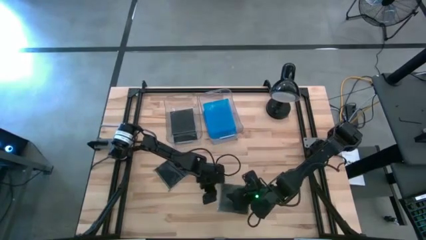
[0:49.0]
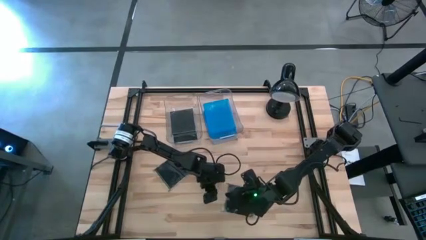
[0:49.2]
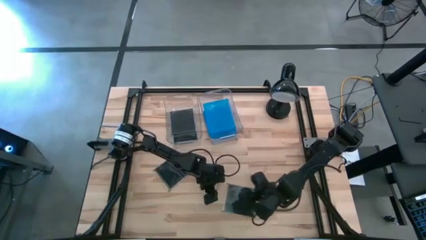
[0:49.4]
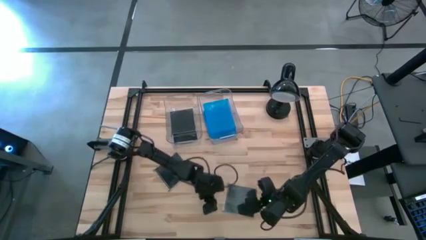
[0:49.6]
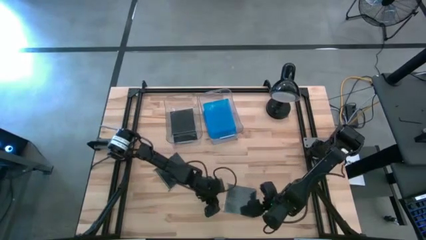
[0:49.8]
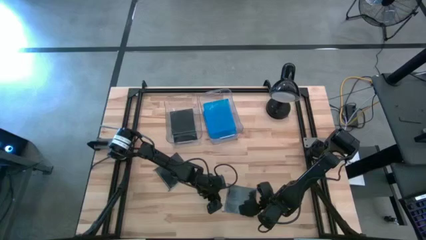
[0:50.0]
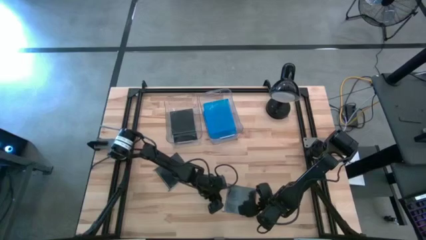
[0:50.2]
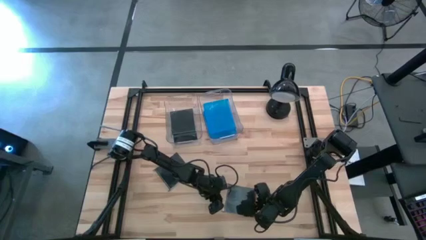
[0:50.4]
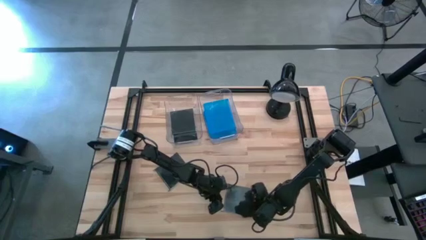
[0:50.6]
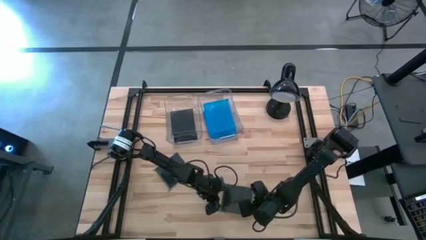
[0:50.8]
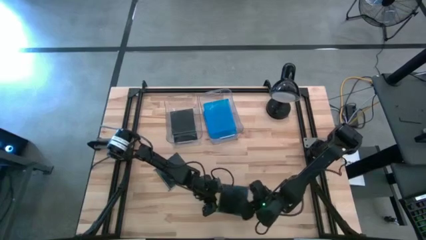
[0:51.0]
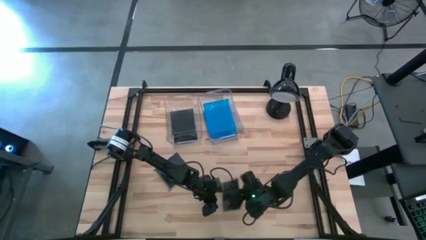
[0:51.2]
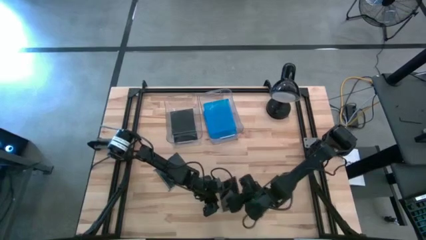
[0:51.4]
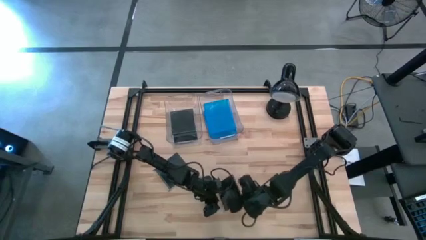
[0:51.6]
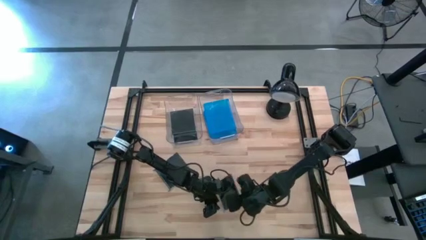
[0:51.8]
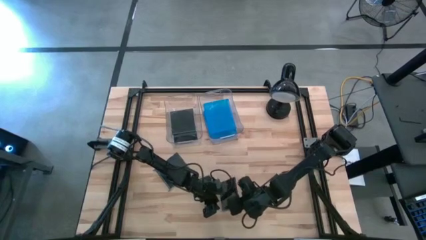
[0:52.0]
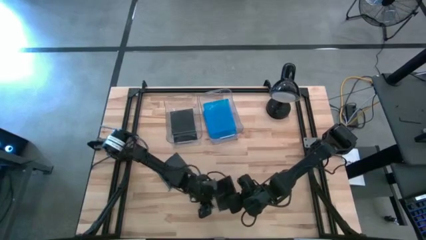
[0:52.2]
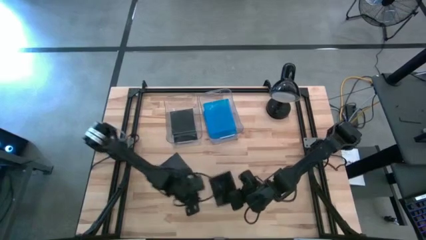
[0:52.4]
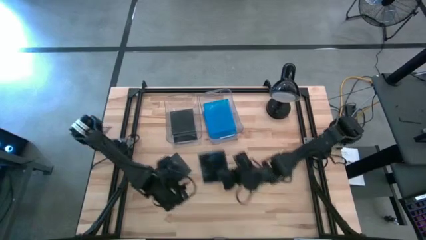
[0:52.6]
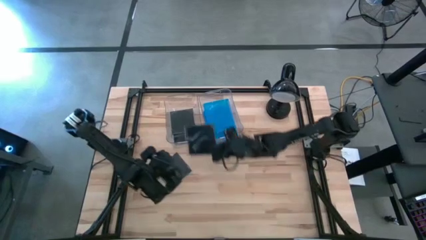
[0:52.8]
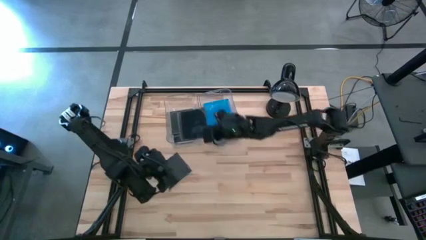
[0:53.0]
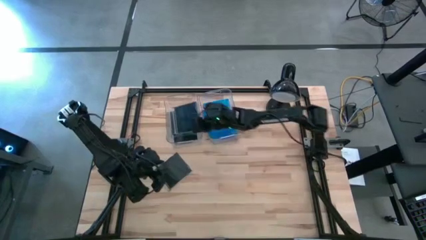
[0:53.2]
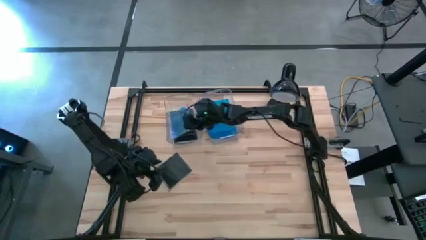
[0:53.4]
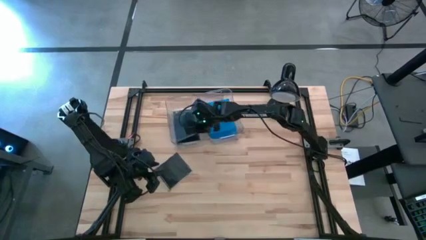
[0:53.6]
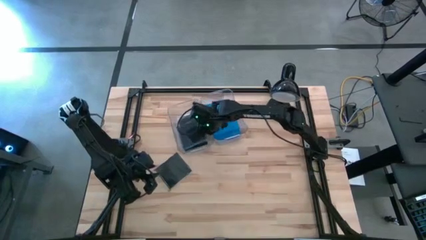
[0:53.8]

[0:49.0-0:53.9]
Task: Pick & place jewel cases by type
Put the black CD case into the left transparent bin

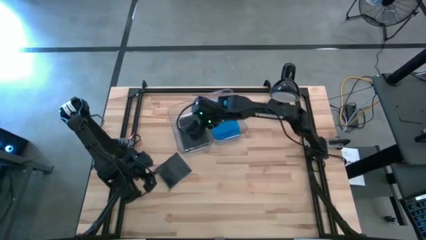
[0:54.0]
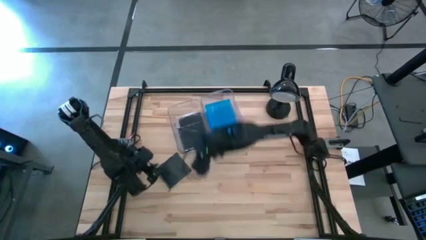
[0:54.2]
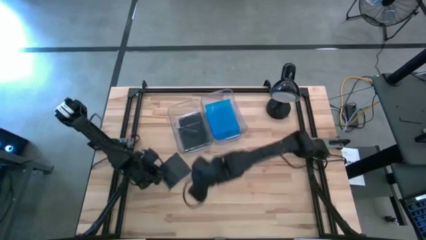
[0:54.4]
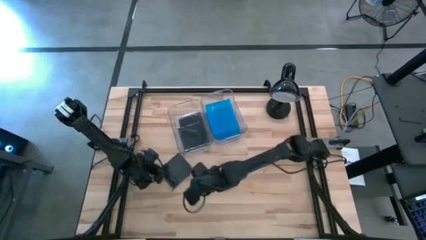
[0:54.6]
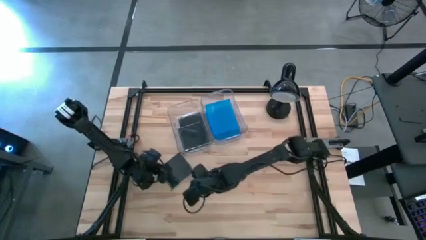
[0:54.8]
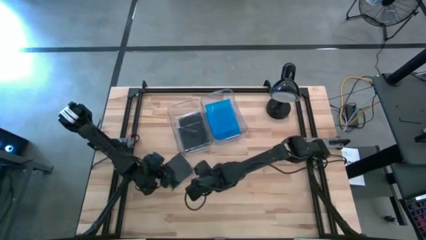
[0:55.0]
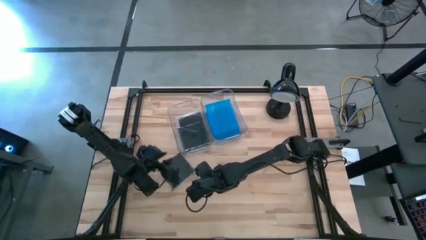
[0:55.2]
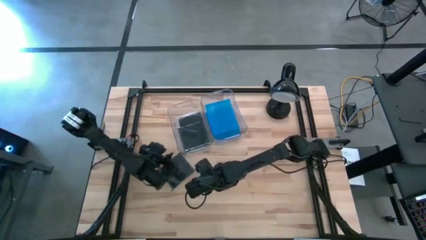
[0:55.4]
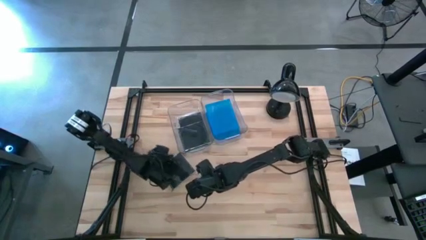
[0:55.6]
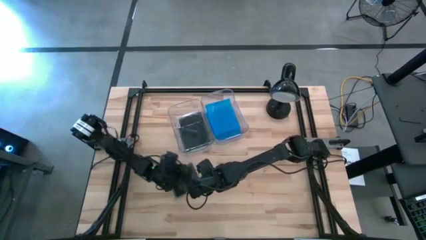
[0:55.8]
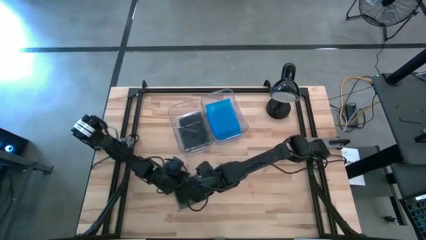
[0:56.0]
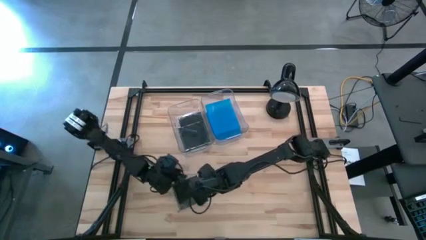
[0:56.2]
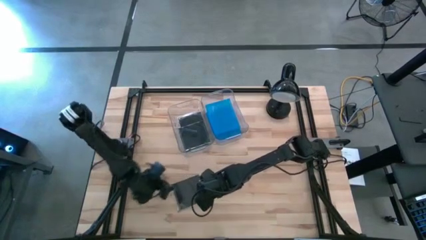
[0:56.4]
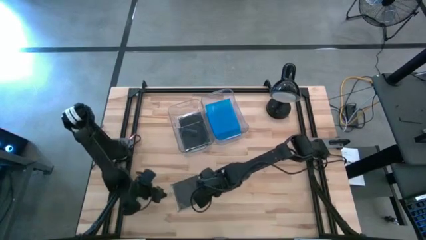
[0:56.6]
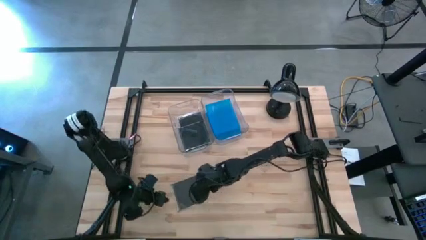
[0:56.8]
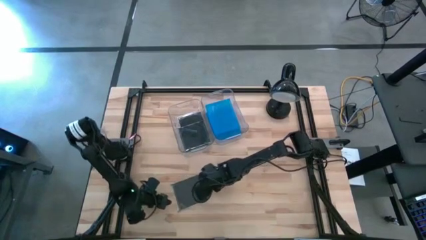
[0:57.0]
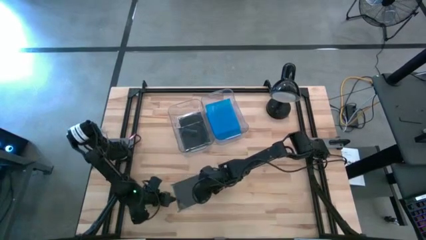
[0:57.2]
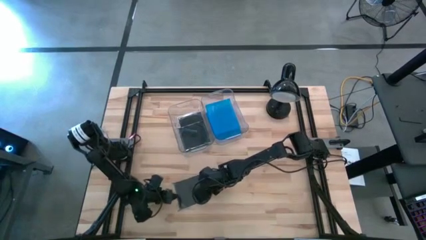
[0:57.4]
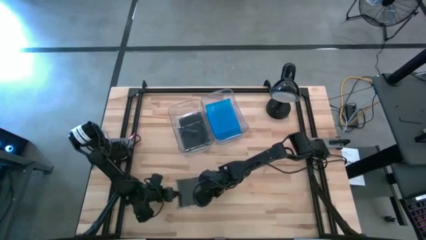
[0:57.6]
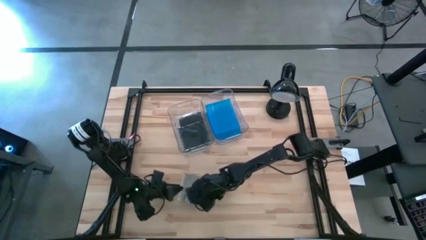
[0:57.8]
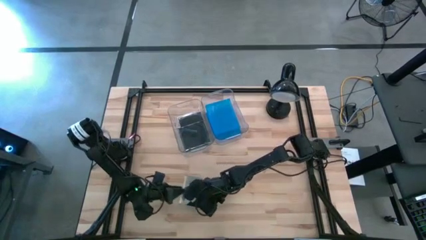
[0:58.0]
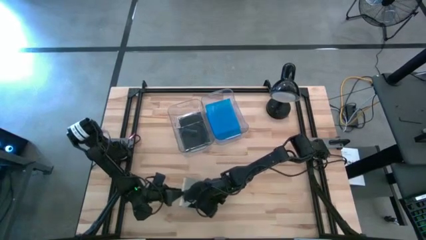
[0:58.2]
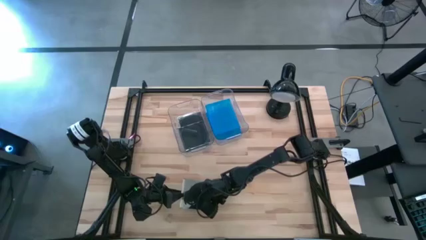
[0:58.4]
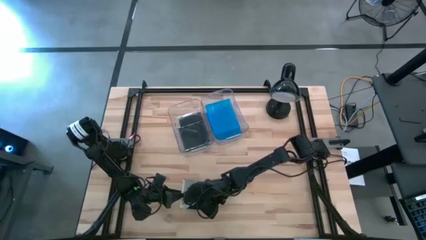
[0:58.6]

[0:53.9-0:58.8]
Put the black CD case into the left transparent bin

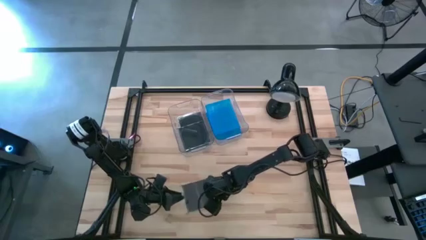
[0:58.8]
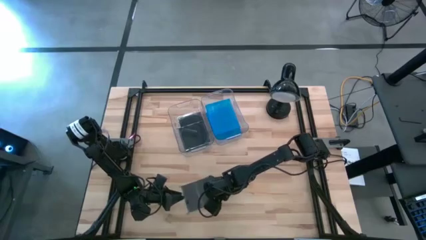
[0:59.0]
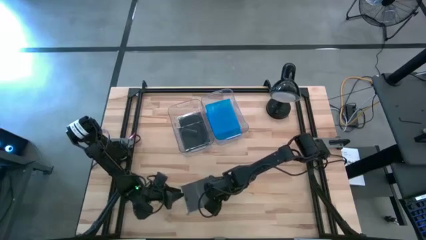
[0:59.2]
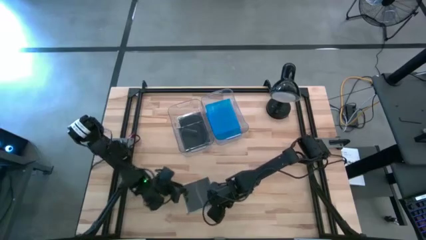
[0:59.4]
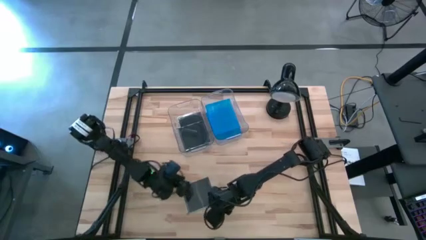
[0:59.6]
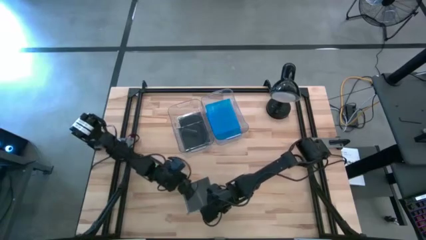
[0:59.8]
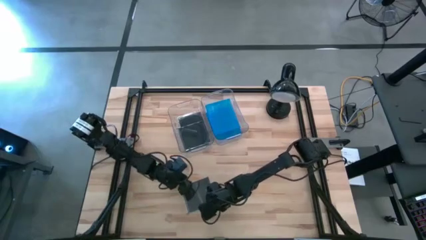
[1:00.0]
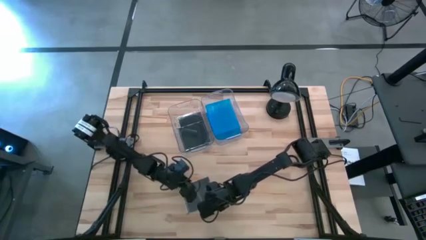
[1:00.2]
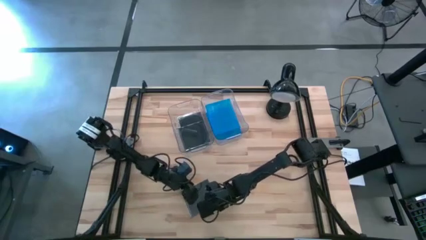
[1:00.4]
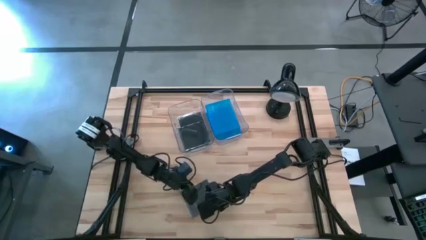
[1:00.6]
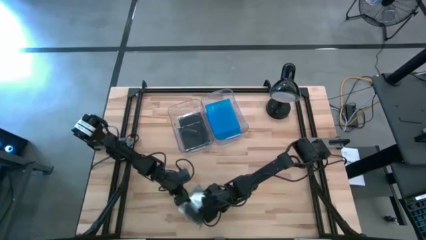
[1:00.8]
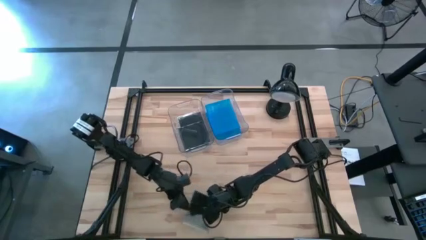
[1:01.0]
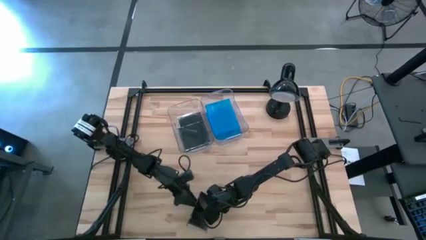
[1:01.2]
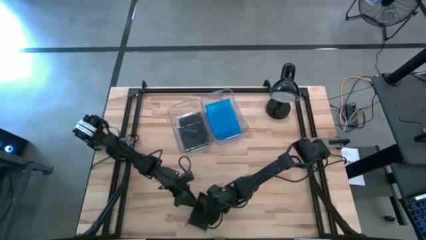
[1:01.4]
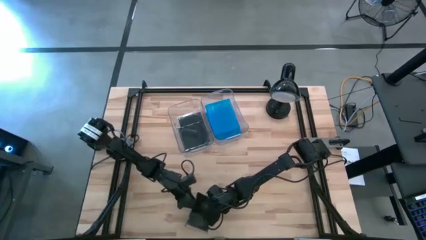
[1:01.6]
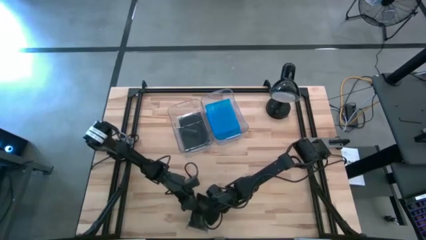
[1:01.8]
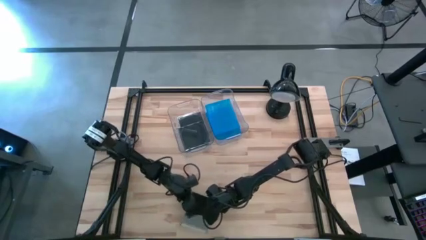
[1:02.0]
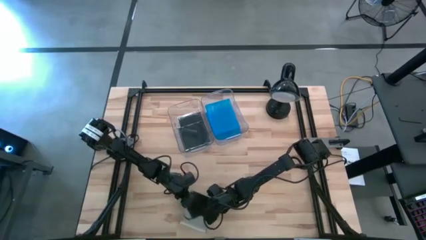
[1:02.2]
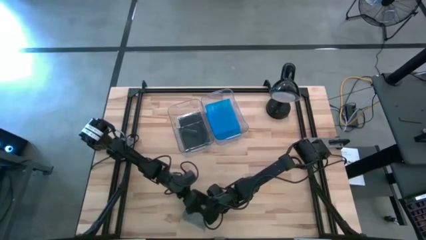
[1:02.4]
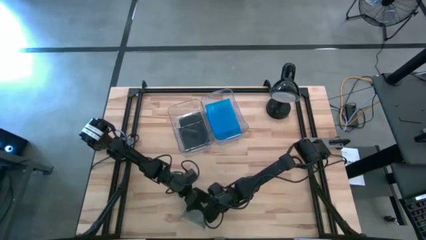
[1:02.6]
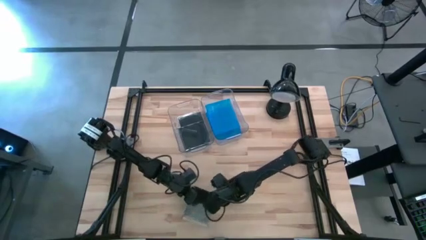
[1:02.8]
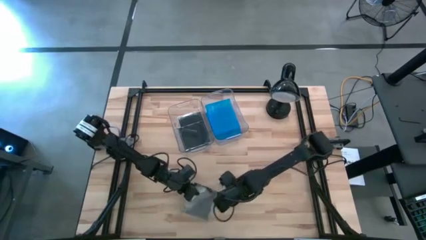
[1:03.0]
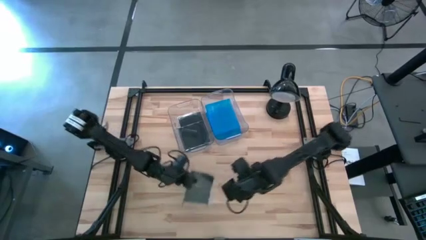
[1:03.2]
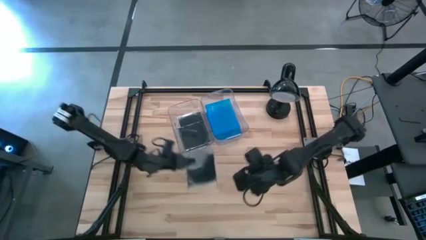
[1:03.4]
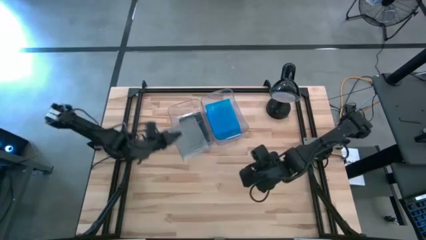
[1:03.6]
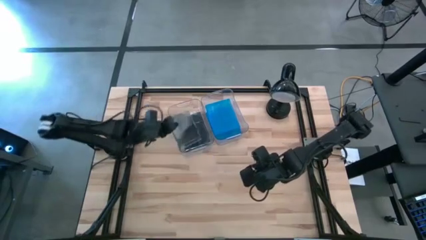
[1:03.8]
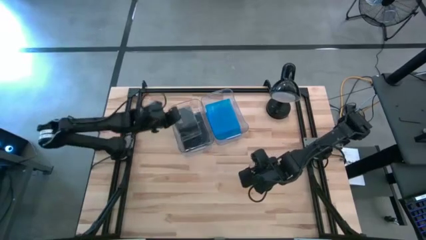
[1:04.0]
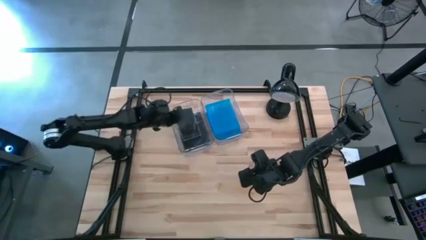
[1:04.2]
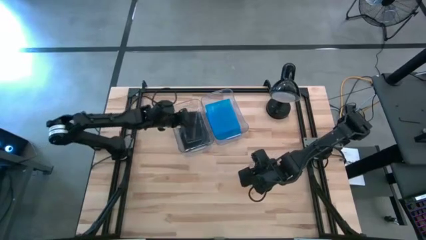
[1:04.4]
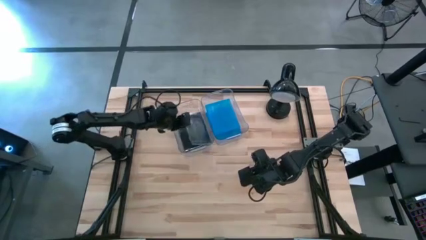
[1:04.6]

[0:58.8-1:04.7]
Put the black CD case into the left transparent bin

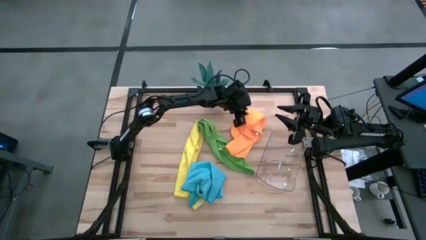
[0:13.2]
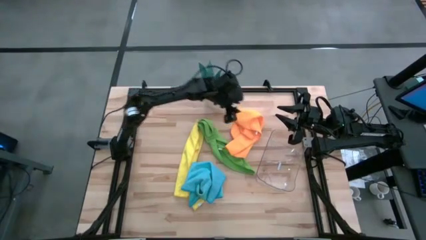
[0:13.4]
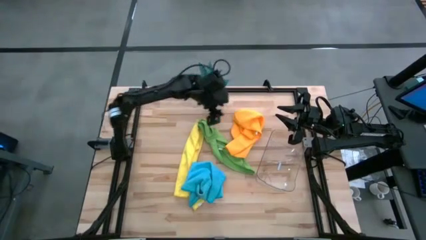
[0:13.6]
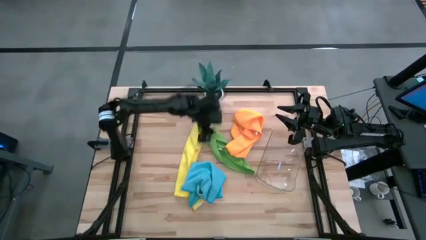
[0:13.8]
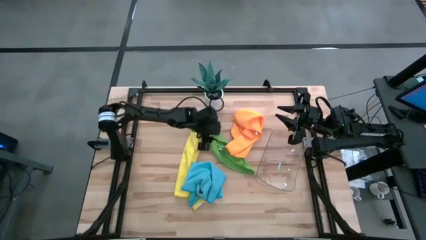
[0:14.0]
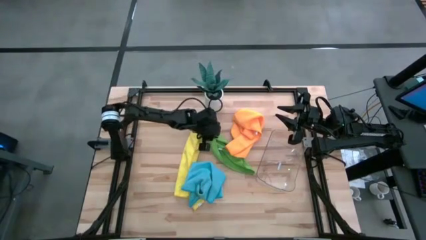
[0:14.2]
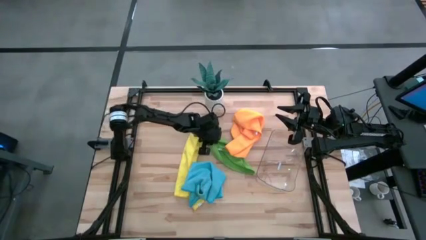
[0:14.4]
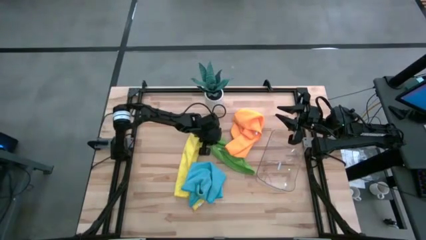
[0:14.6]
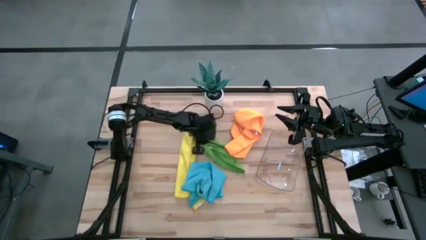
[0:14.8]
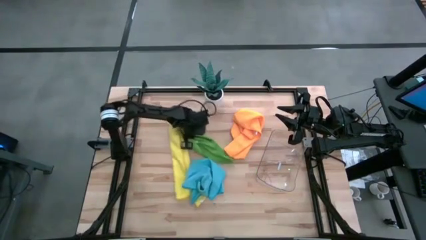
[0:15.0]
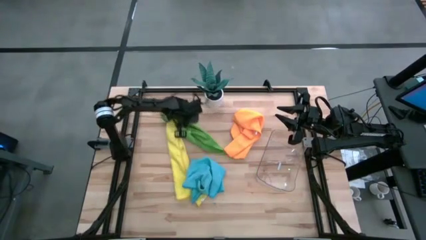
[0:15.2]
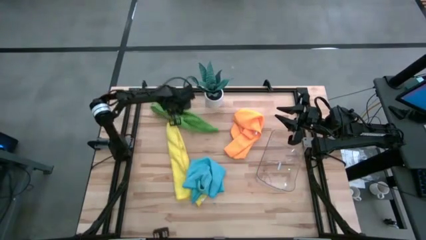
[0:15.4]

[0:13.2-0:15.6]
Task: Roll microfiber towels into tight, uniform cylinder then place into a basket
Move the green microfiber cloth from center to top left
